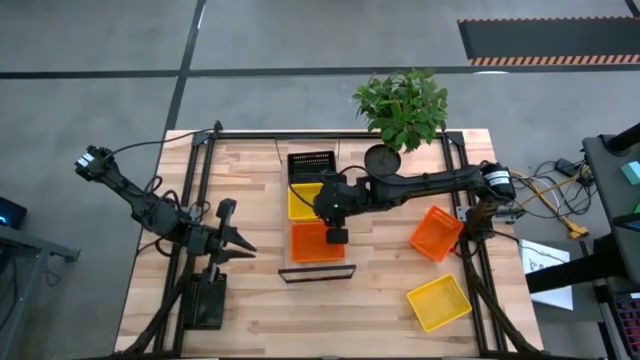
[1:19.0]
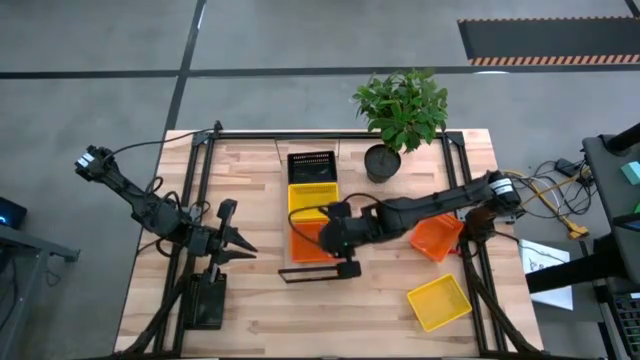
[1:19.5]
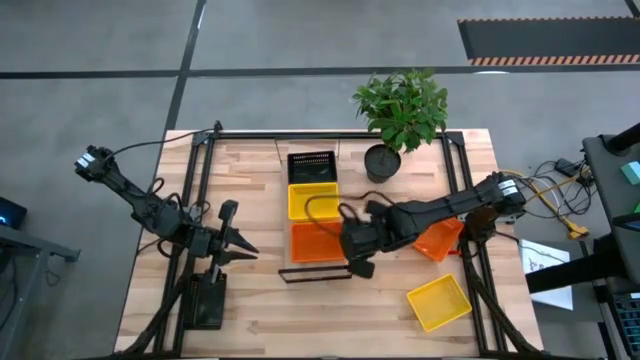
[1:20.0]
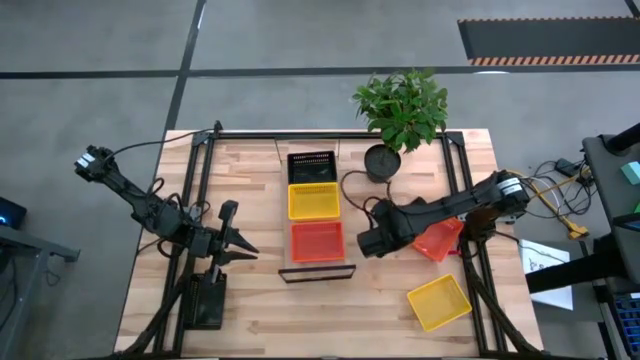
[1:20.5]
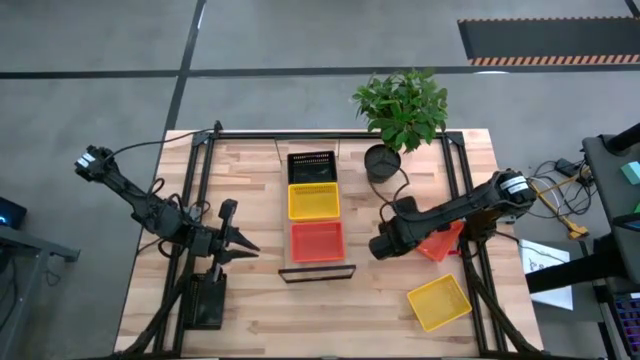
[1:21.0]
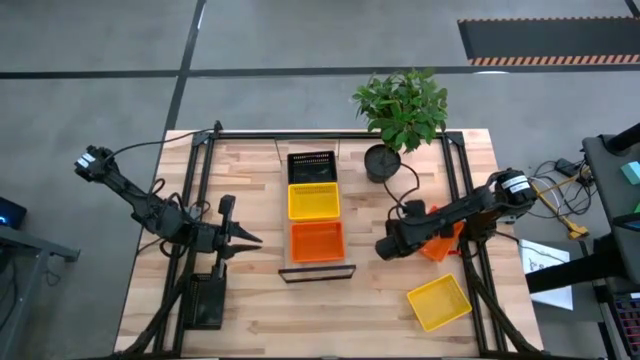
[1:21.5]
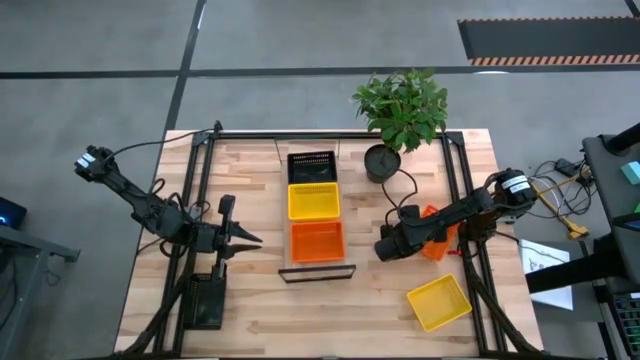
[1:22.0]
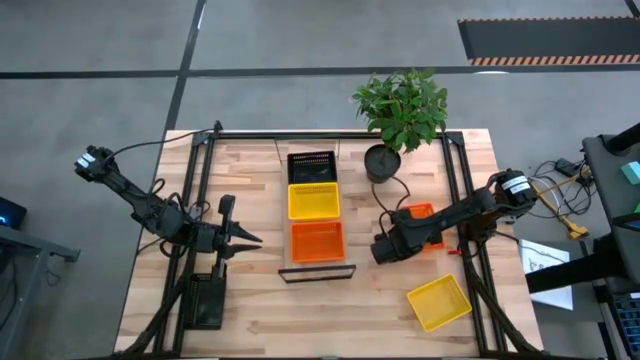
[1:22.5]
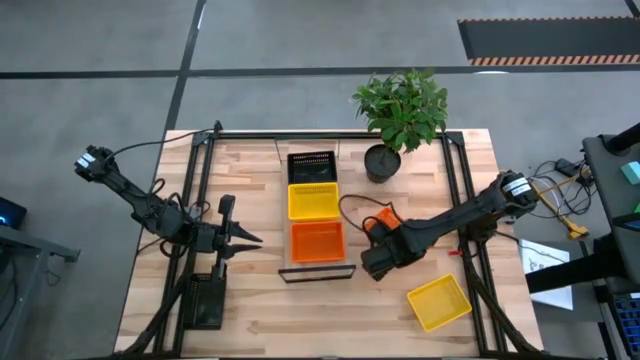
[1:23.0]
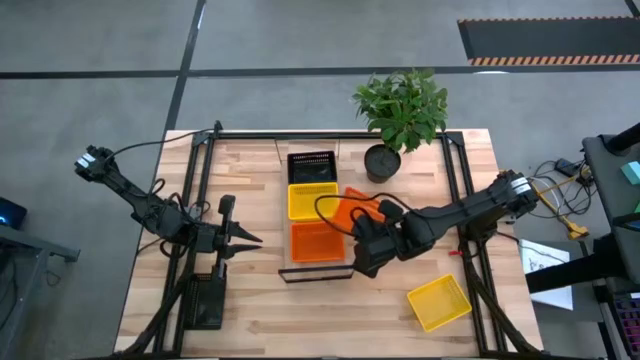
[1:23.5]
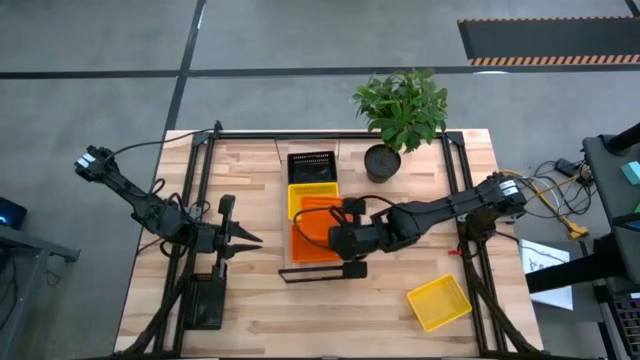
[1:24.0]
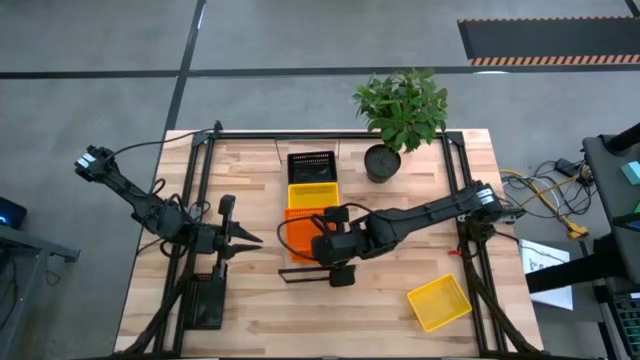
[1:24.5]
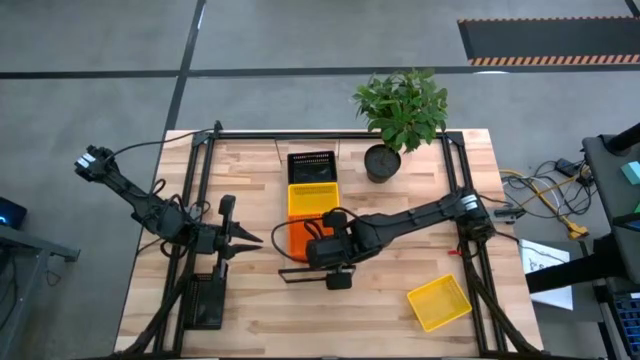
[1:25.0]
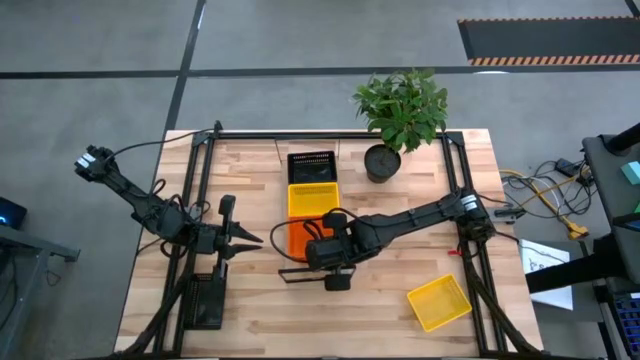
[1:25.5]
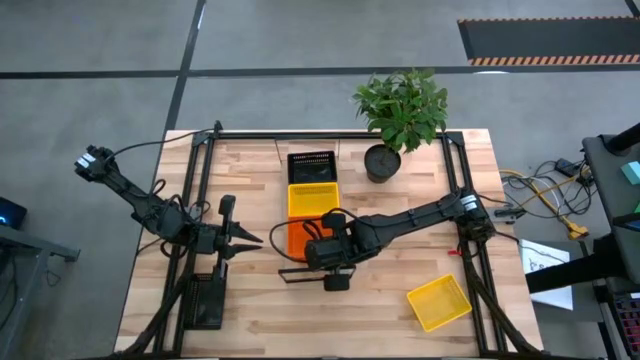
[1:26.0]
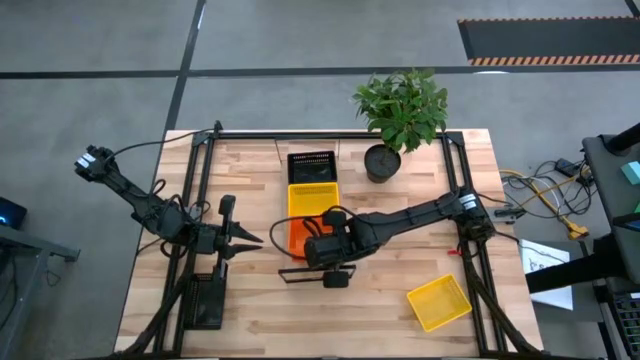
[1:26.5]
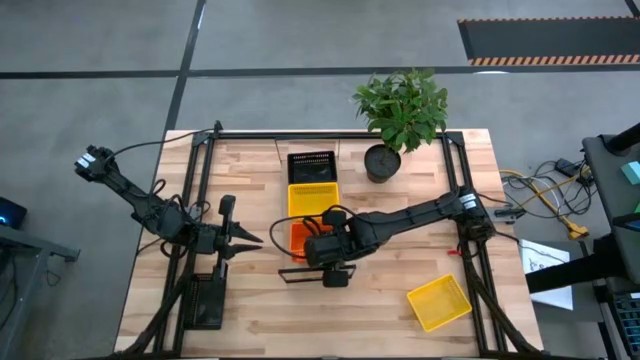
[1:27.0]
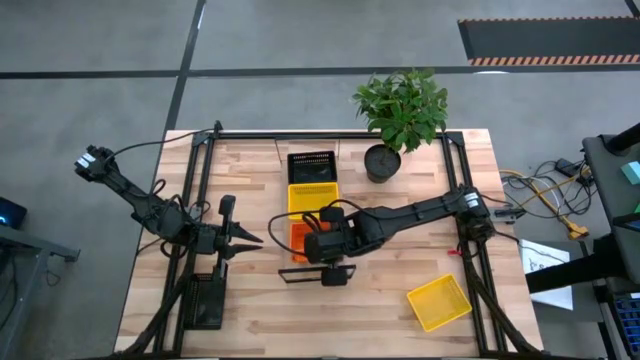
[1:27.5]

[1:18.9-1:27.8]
Task: Stack baskets on shelf by color
Stack the orange bin on top of the orange bins on the shelf

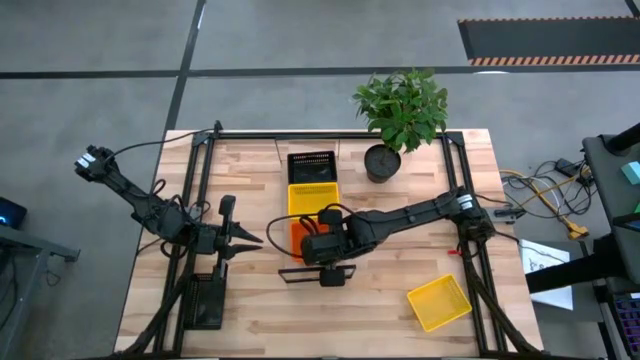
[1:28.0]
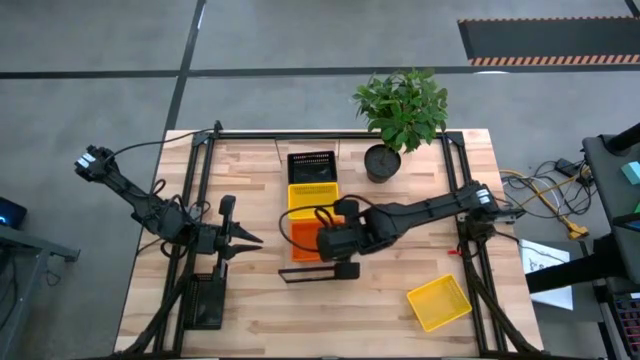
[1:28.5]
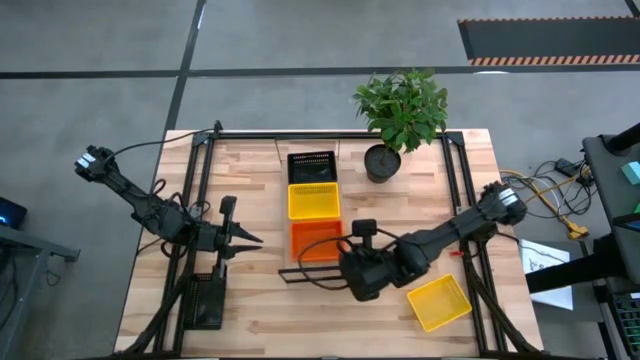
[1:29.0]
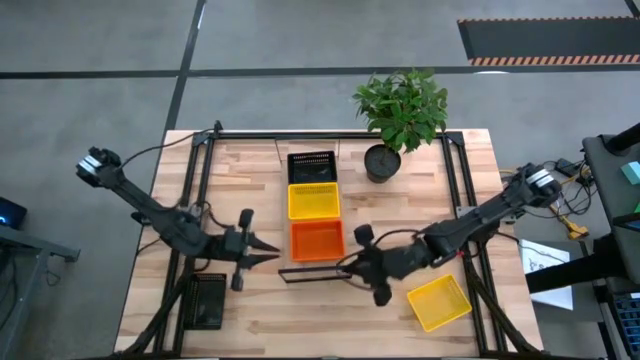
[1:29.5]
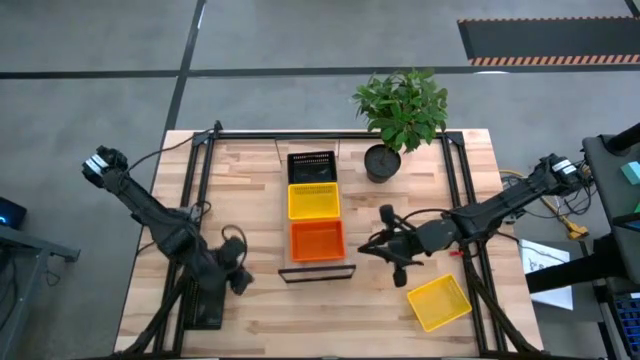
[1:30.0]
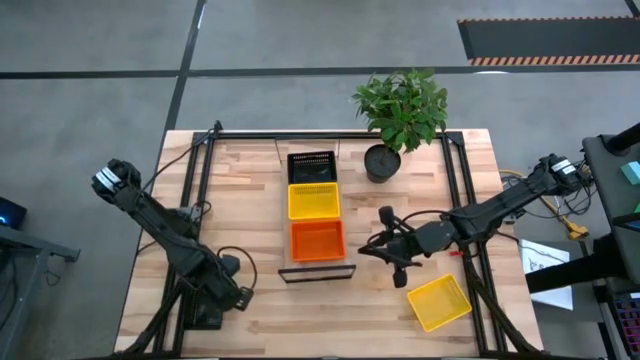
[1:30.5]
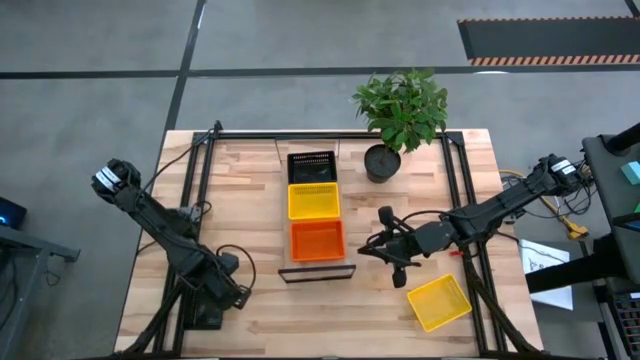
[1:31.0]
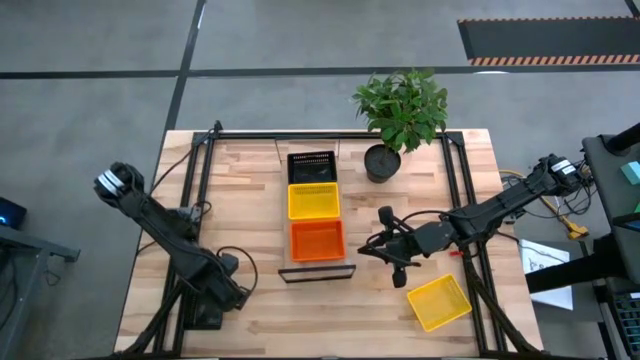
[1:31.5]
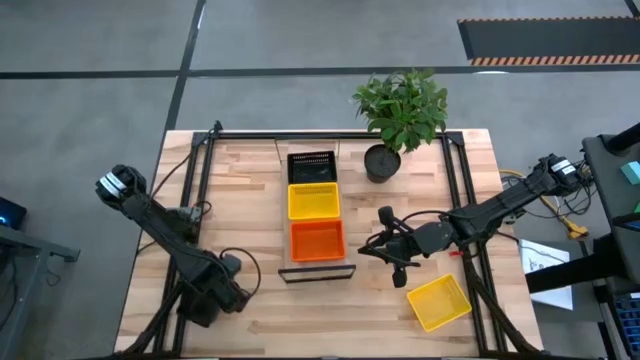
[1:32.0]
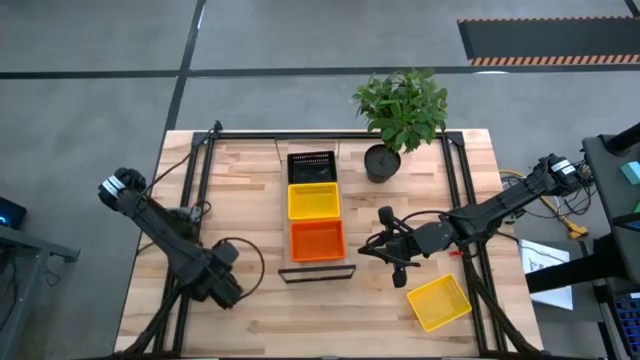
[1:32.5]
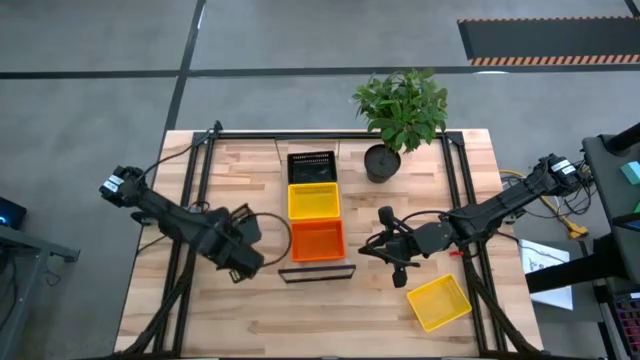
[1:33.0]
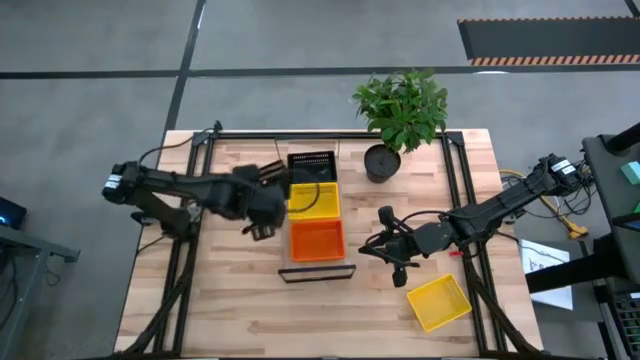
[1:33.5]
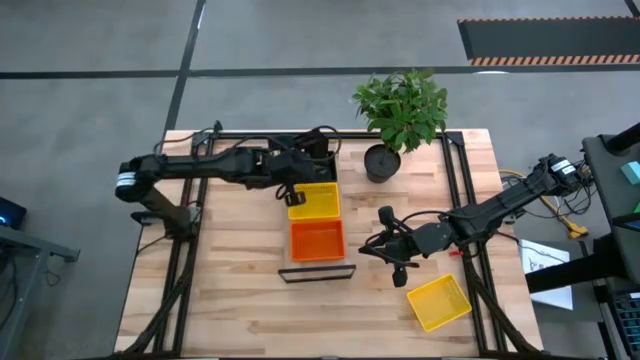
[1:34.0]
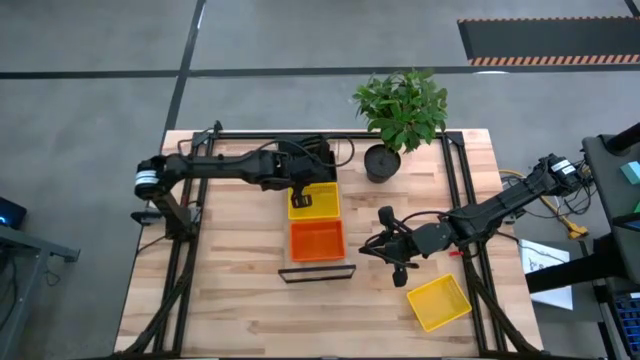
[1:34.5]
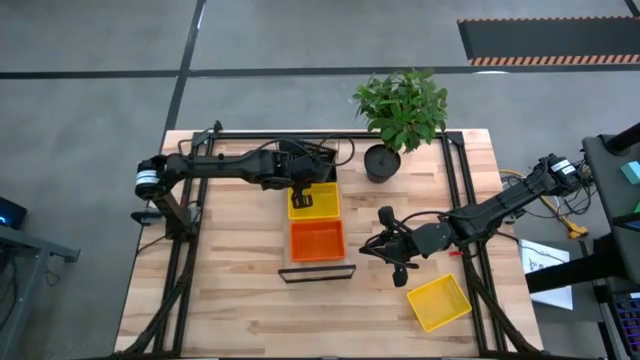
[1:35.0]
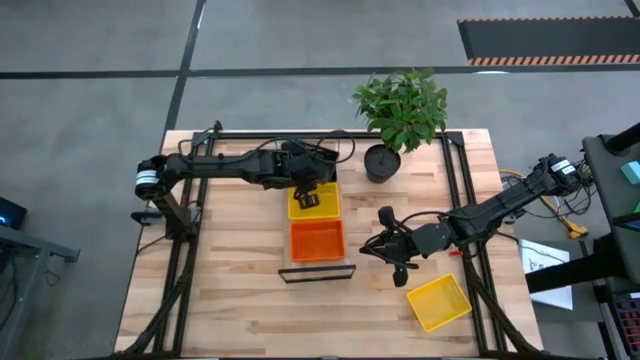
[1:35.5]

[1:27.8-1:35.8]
Stack the black bin on top of the black bins on the shelf

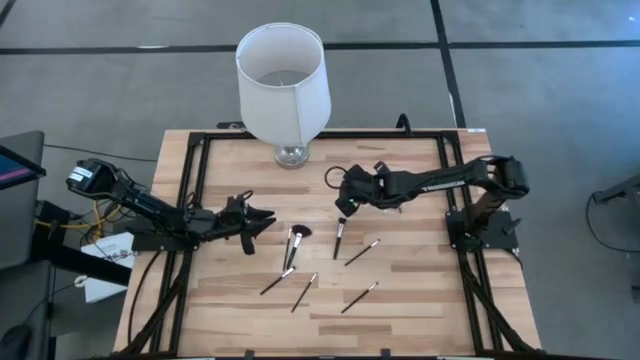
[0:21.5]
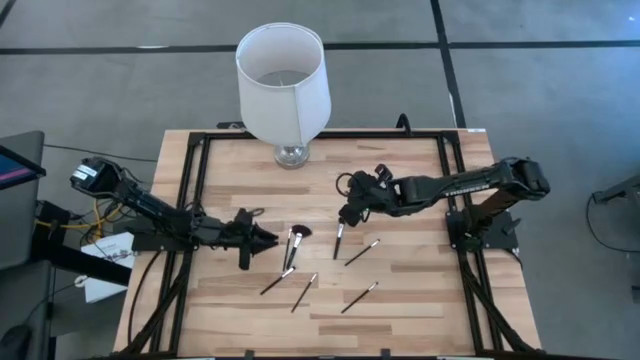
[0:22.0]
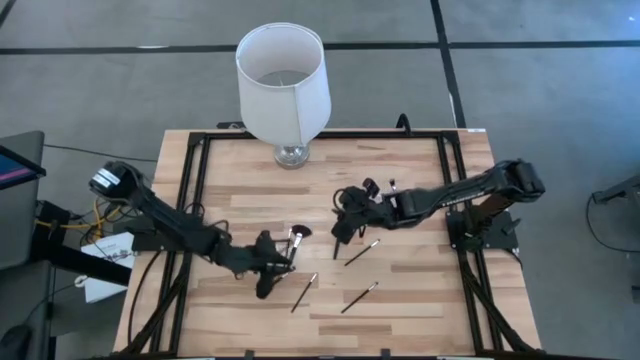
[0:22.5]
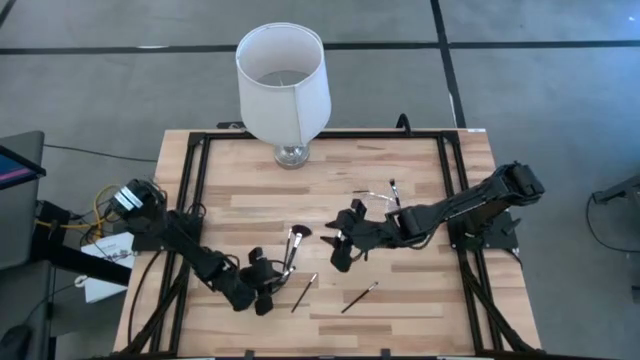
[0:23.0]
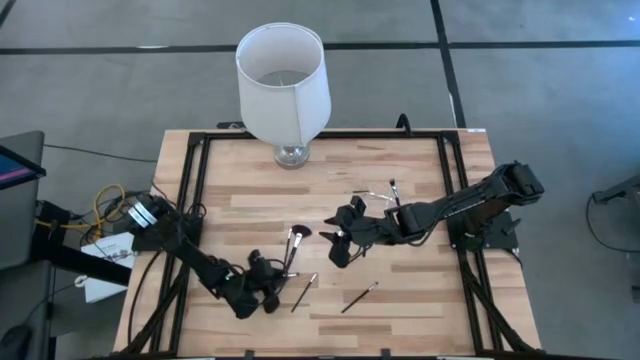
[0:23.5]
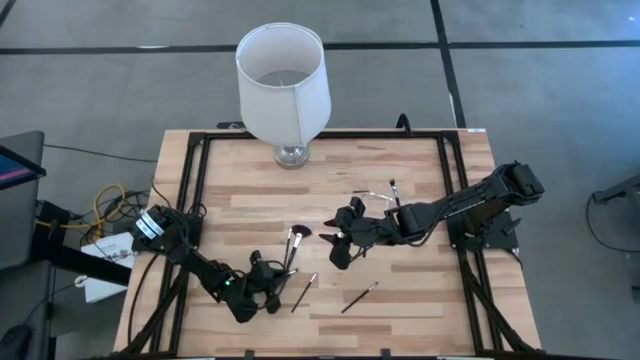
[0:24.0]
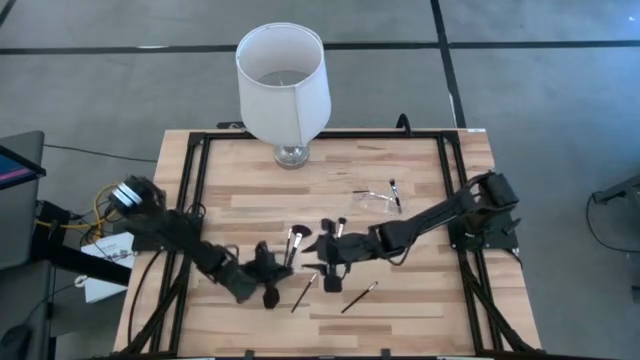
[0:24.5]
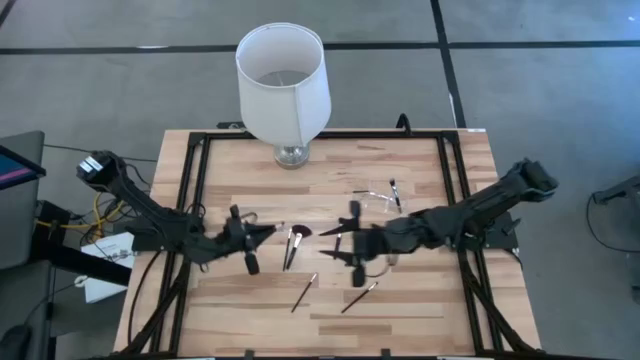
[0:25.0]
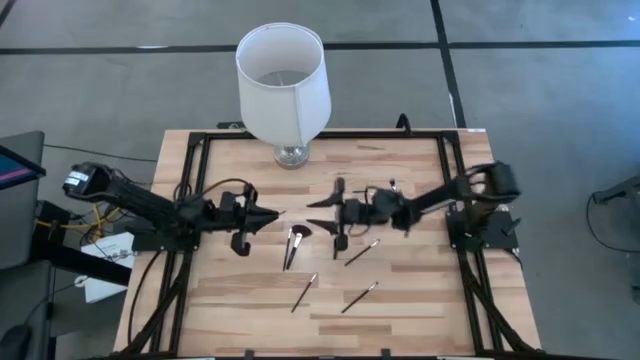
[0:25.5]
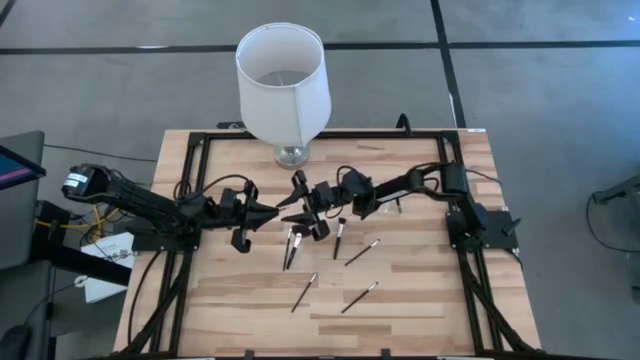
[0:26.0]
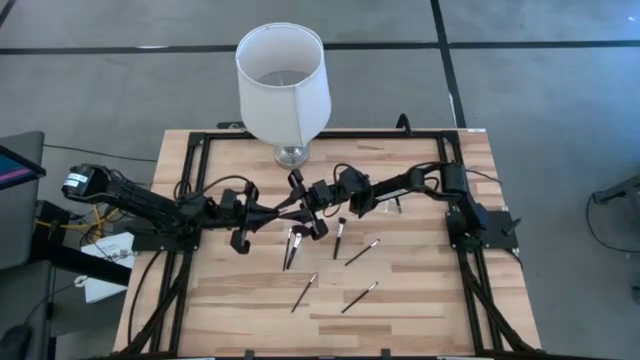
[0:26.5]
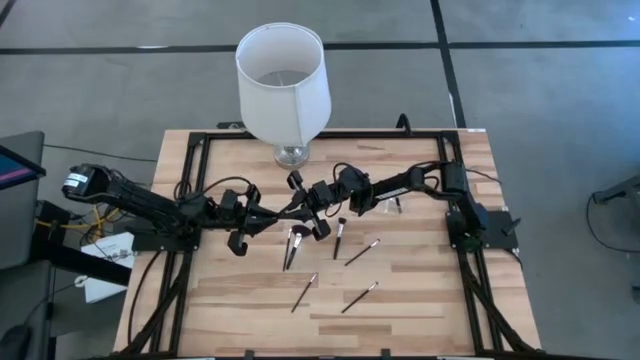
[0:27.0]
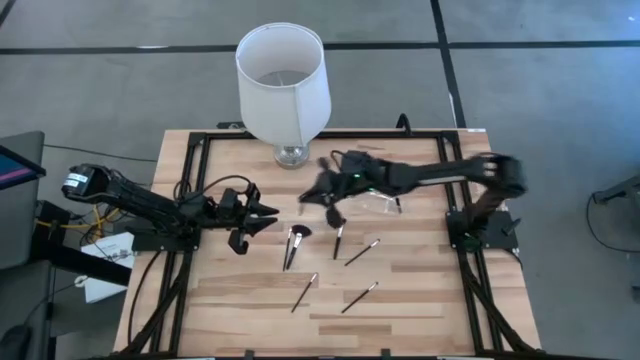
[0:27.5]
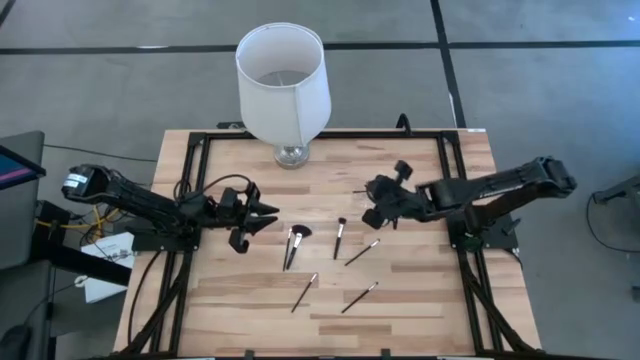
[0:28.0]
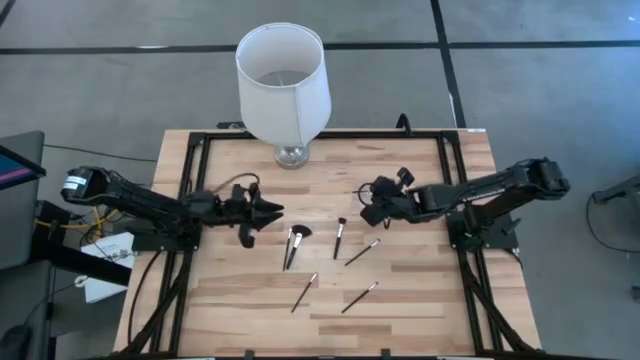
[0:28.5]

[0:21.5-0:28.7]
Task: Pick & Place Makeup Supplies
Put the black makeup brush into the transparent organizer
